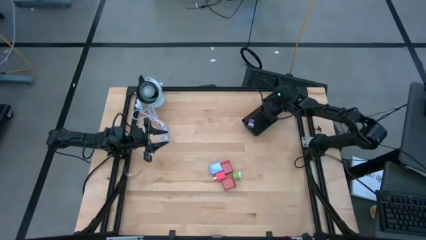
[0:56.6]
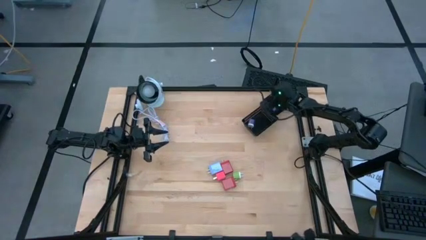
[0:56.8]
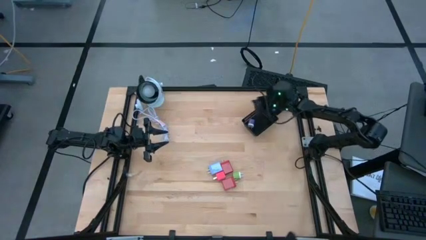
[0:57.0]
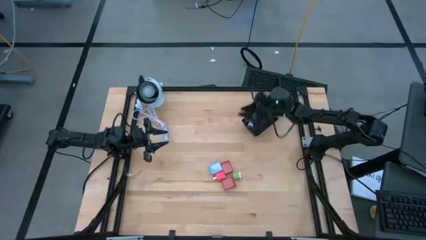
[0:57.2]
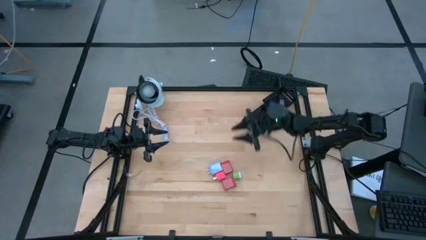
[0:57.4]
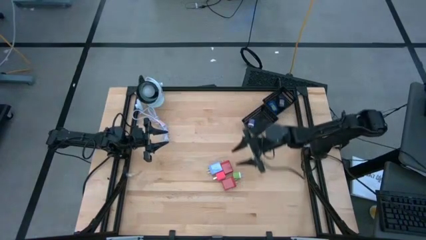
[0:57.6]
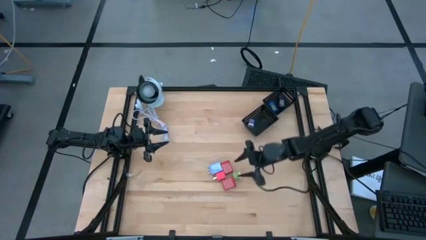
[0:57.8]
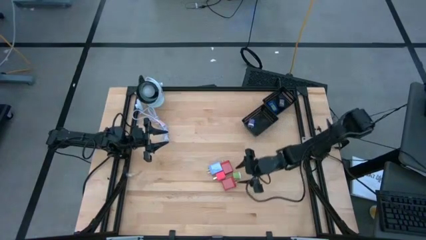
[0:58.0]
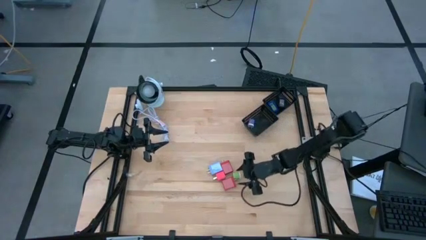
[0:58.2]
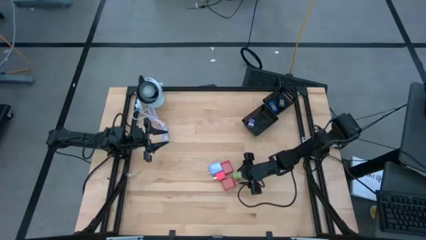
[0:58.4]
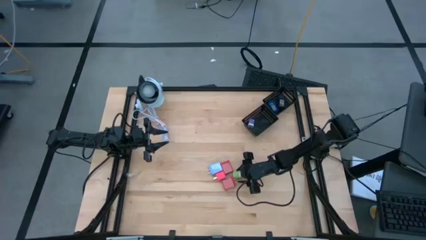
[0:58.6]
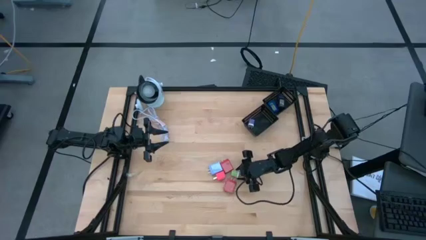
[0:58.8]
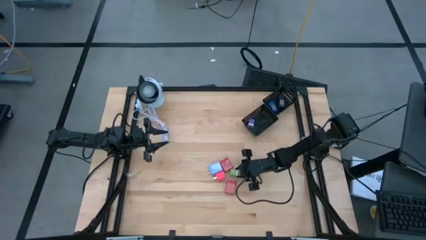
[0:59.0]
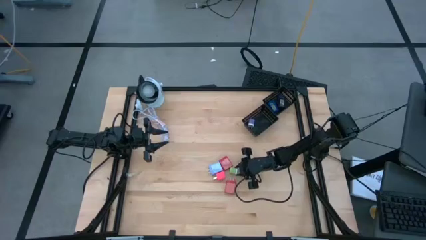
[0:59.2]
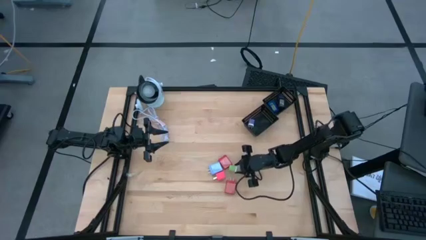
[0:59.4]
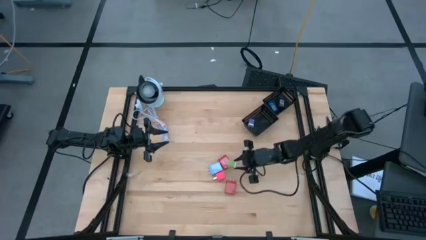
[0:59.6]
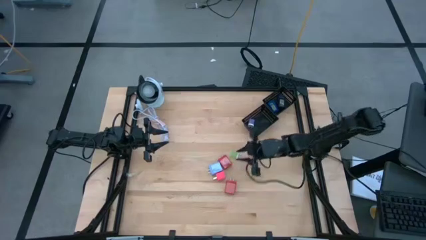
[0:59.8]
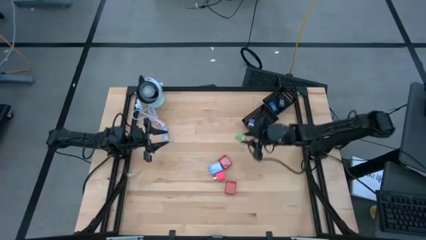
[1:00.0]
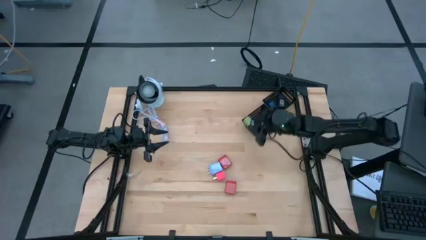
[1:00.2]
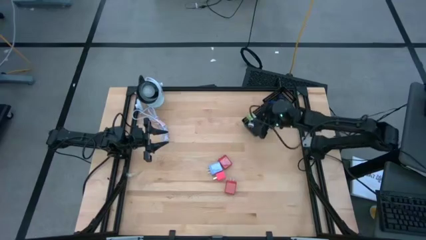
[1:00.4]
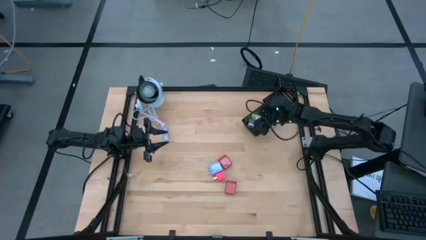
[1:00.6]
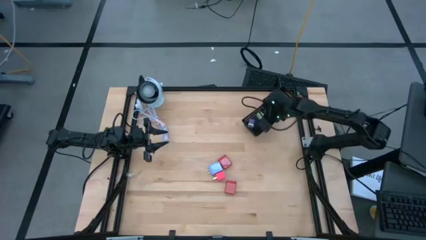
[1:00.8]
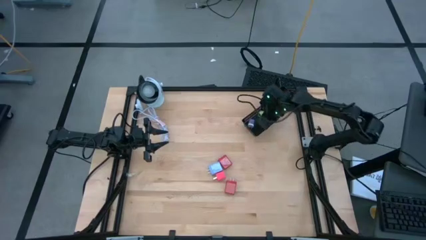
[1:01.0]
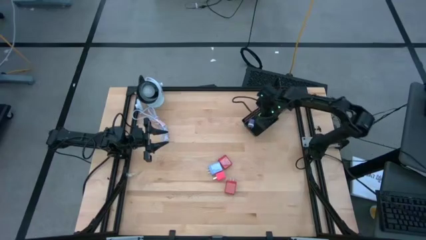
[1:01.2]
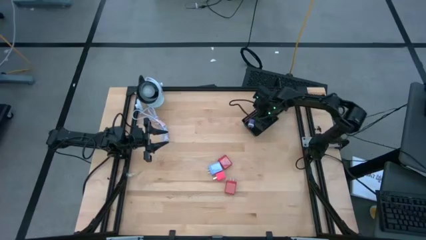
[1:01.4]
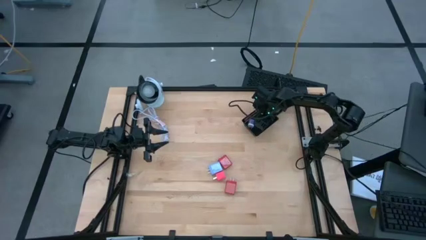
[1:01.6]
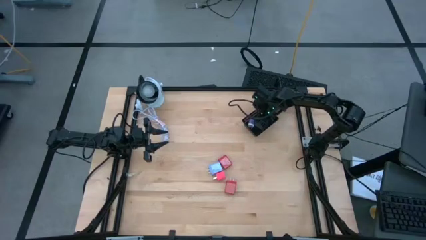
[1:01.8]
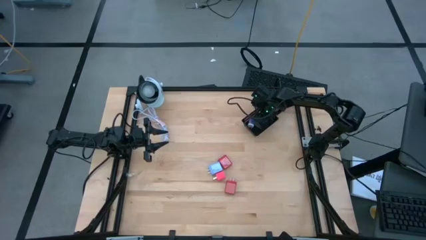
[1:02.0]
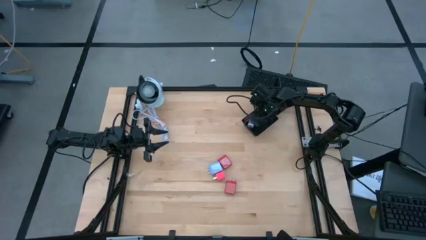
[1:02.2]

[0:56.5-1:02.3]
Task: Pick & Place Office items
Put the small green charger adapter into the bottom black bin

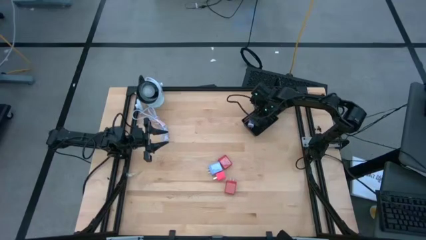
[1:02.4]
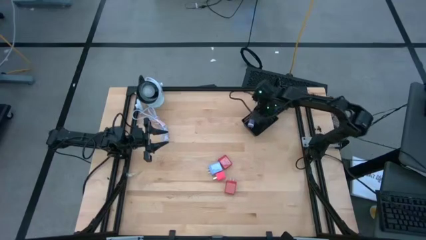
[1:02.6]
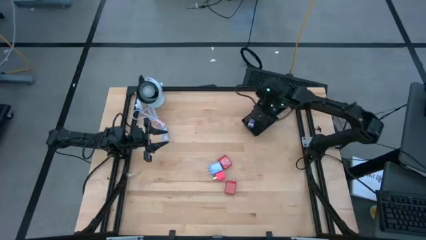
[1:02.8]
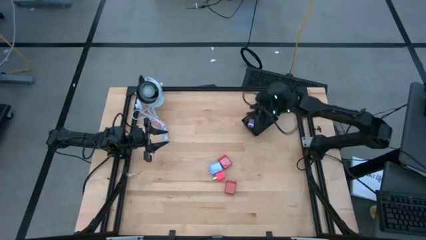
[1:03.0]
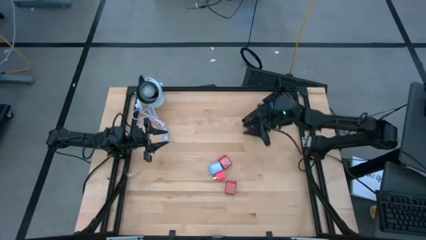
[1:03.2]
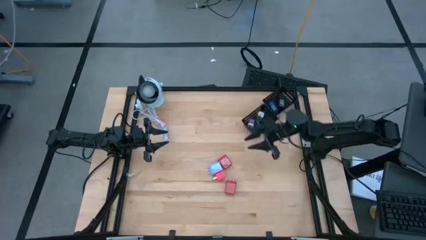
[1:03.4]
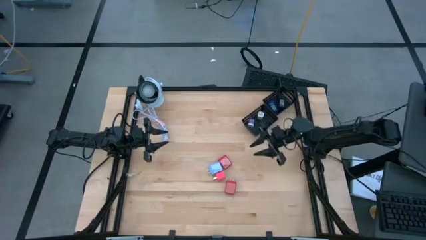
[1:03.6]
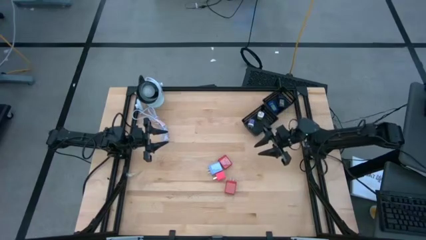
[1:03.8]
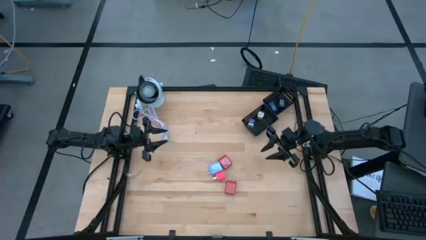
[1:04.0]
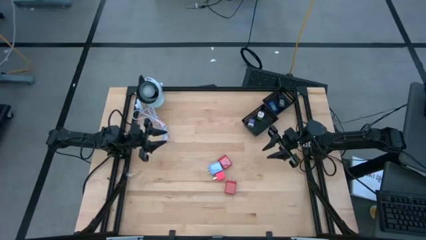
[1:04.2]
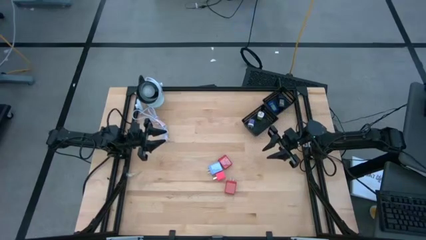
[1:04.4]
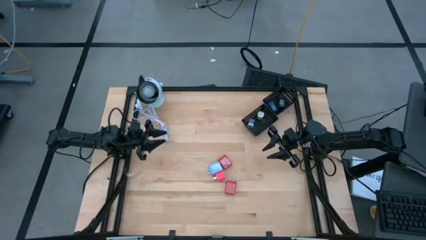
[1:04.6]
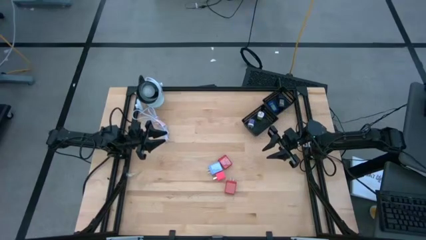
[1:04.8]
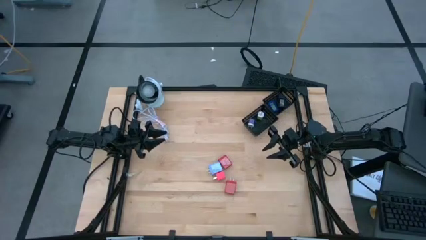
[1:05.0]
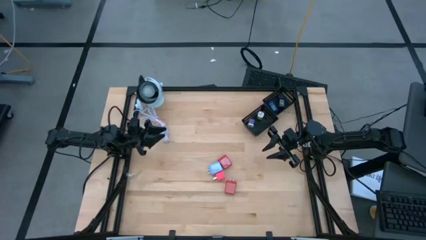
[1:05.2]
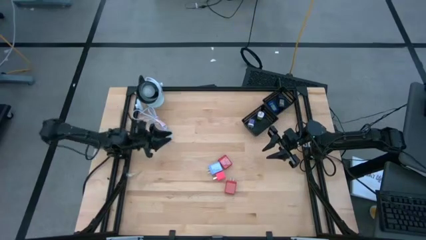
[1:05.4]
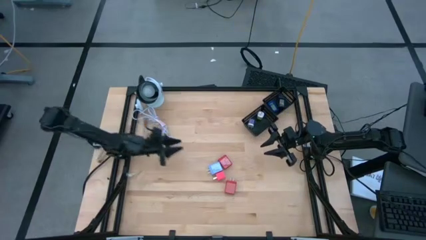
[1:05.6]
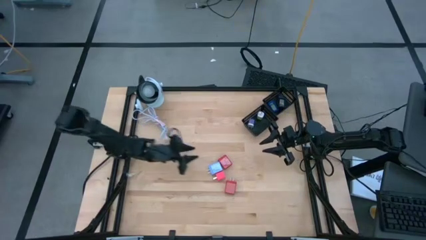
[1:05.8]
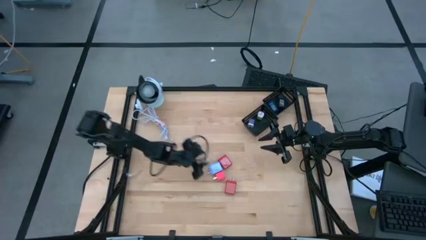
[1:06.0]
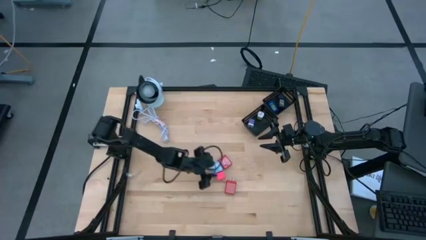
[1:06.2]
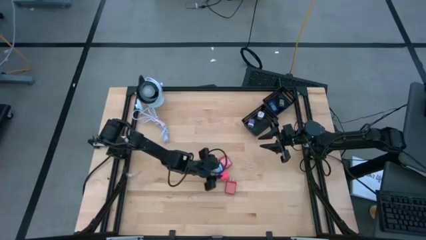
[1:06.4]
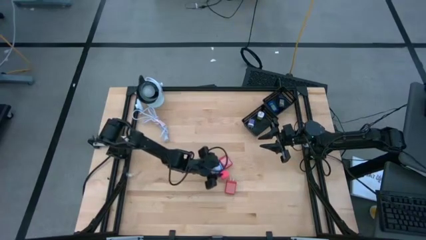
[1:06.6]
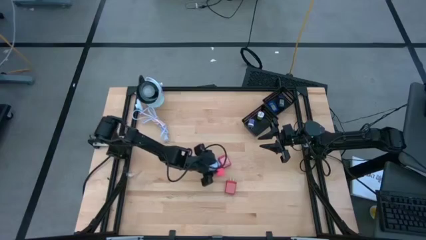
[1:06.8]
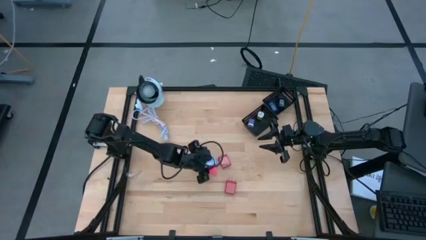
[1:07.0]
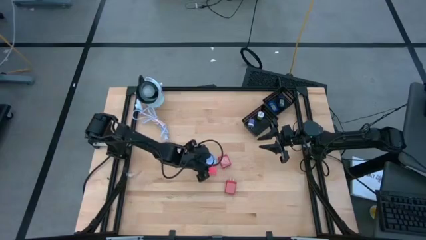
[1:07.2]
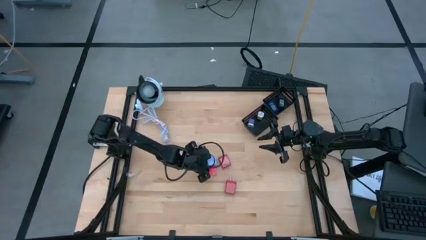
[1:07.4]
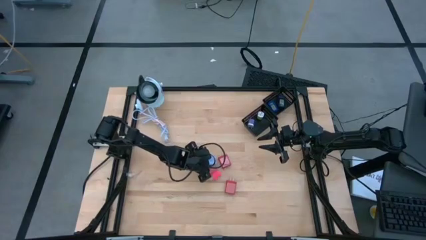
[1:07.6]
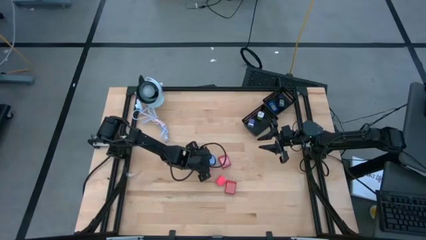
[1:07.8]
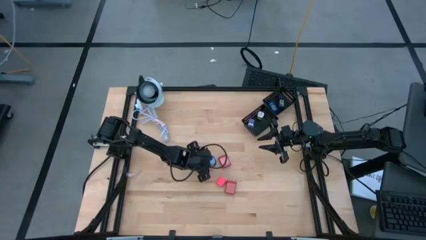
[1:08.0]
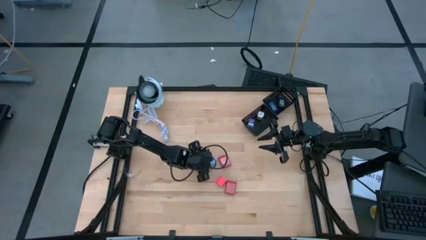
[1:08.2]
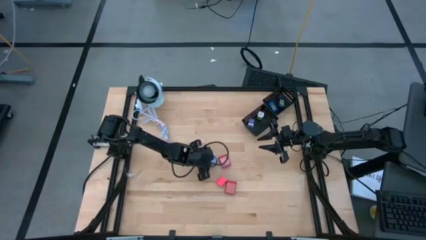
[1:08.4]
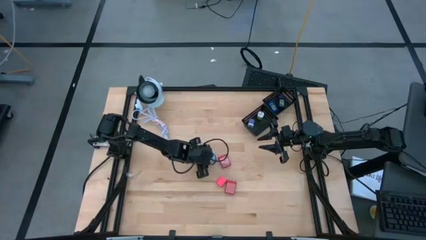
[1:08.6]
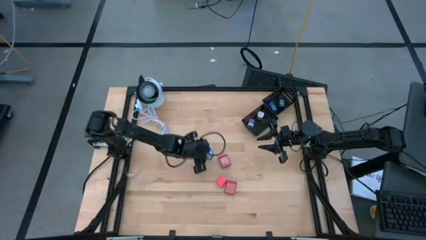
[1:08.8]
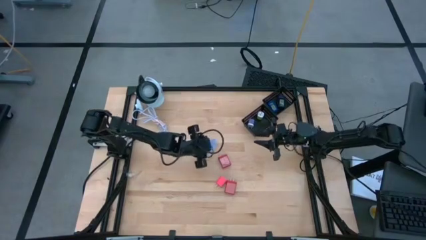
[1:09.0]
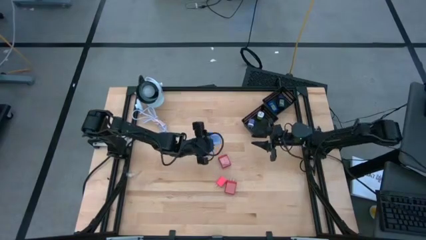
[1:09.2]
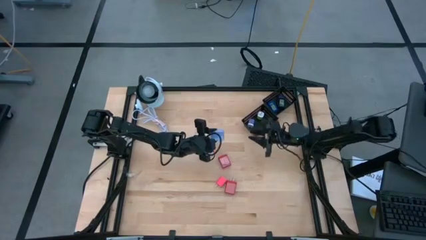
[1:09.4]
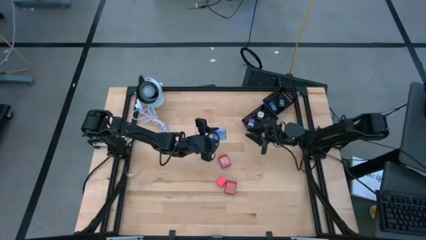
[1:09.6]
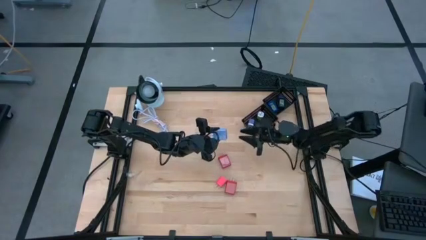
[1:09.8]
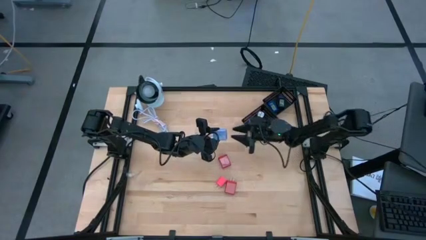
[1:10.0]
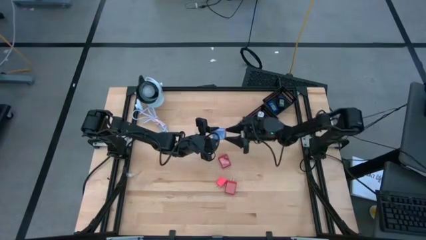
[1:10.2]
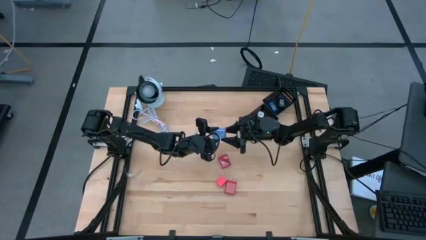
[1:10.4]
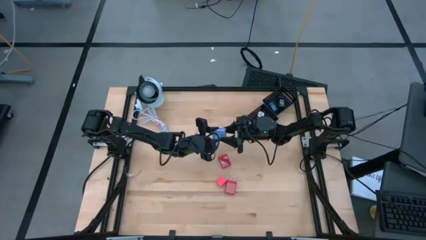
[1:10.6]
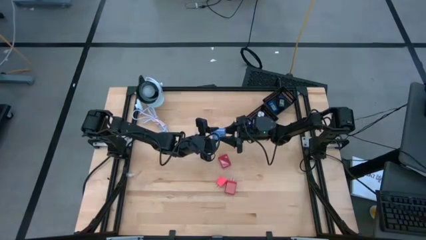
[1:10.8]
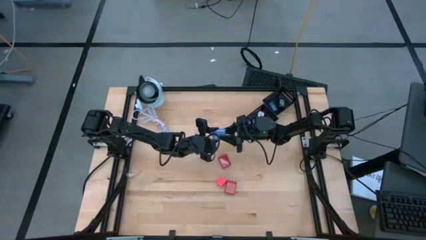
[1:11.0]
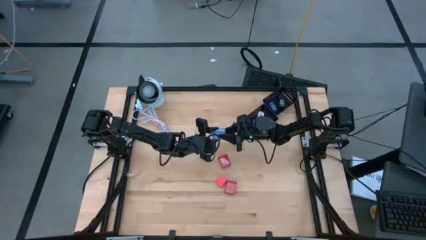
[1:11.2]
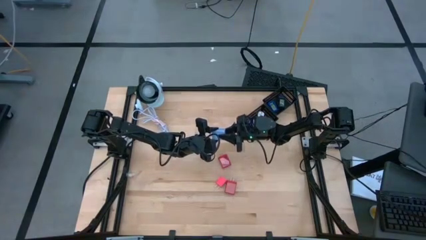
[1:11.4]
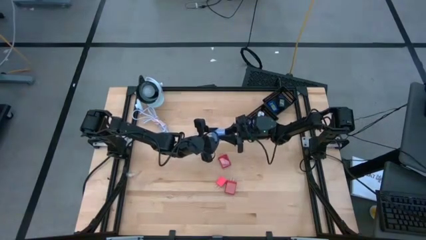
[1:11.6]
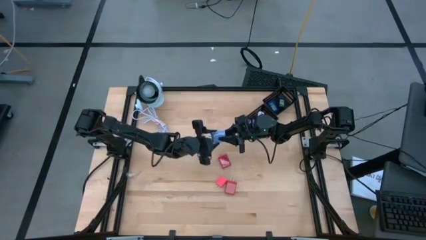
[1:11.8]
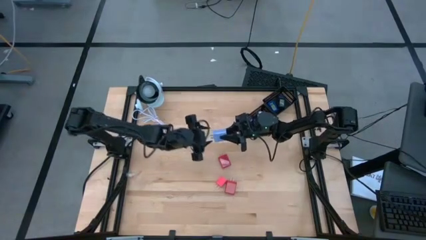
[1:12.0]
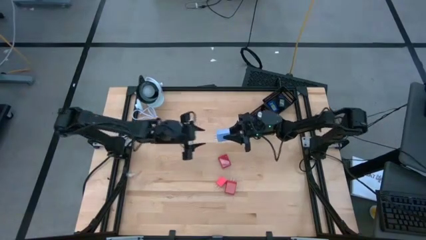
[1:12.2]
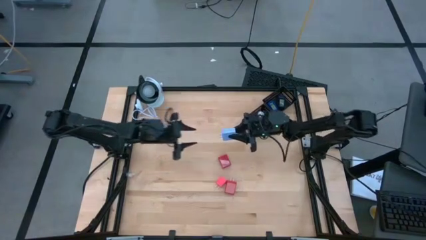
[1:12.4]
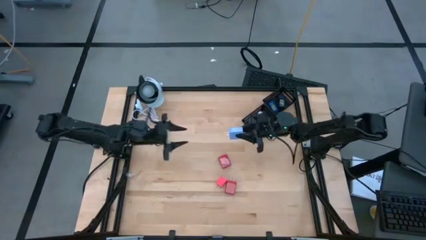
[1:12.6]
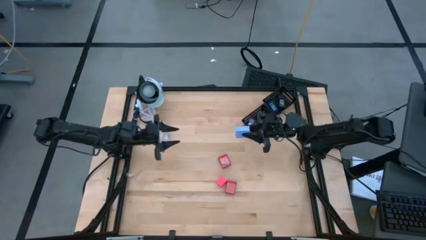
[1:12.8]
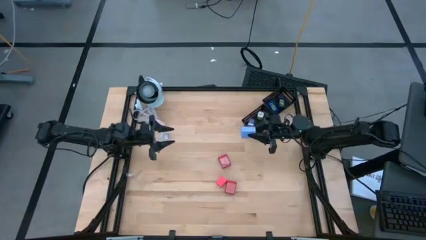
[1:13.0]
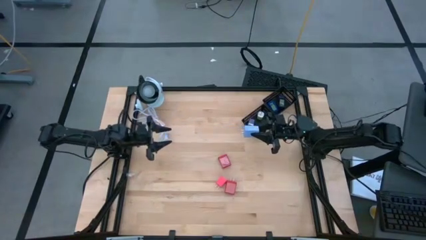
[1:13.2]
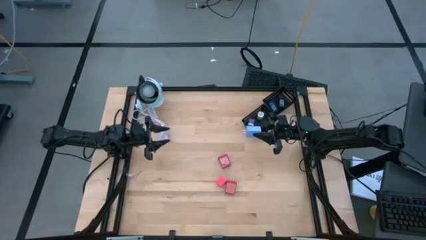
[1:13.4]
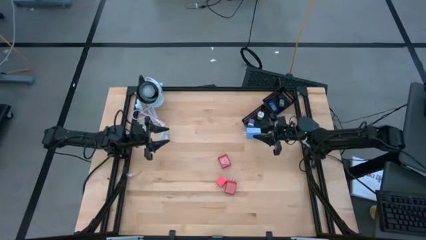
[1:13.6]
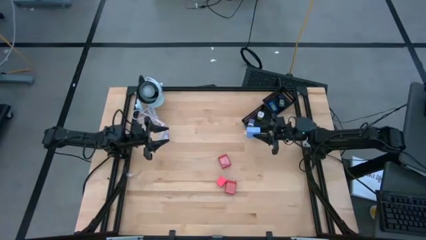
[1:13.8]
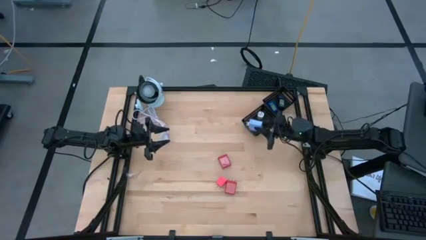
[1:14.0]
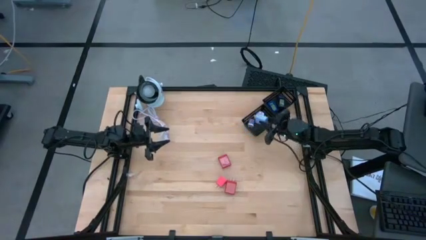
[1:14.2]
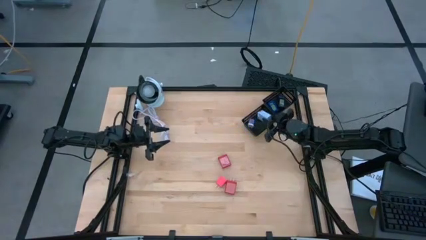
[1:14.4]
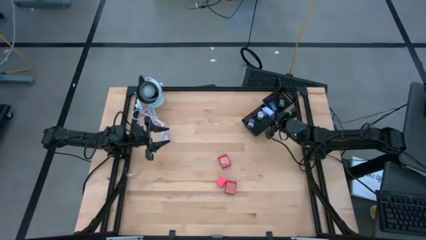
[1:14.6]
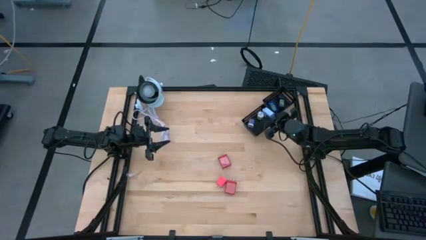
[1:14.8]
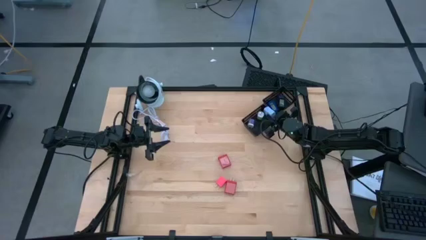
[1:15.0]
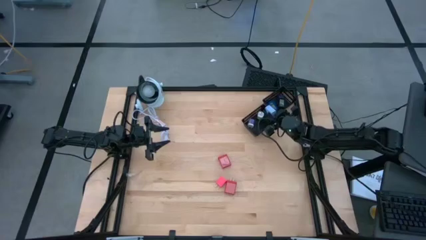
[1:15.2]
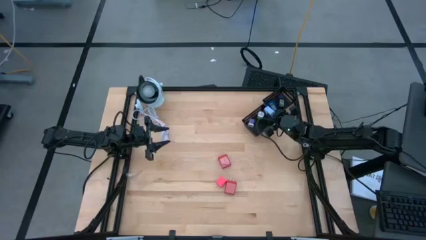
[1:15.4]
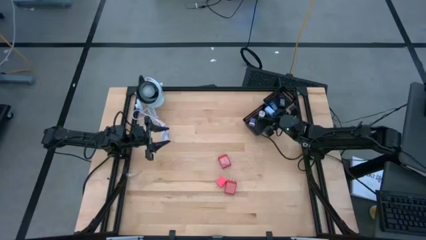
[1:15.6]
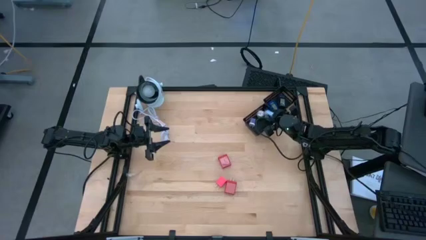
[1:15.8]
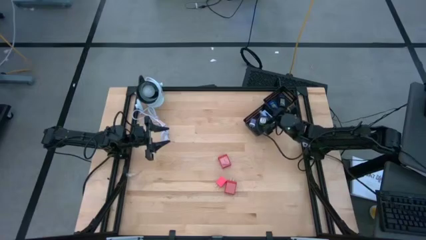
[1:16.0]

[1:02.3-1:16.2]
Put the big light blue charger adapter into the bottom black bin
